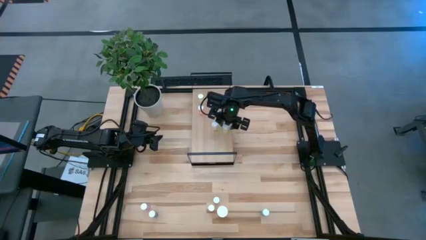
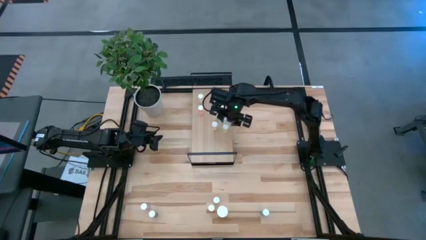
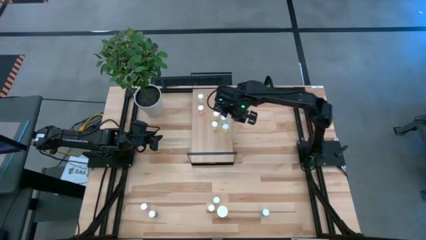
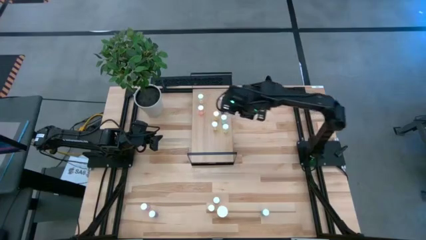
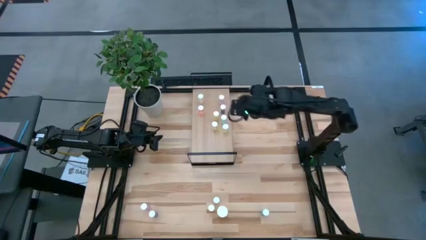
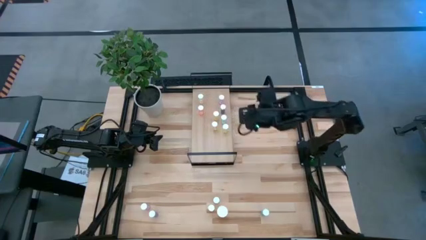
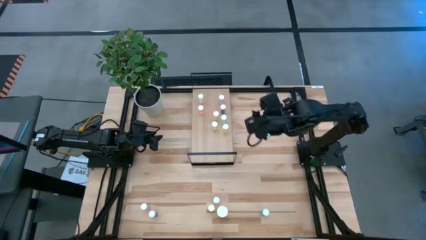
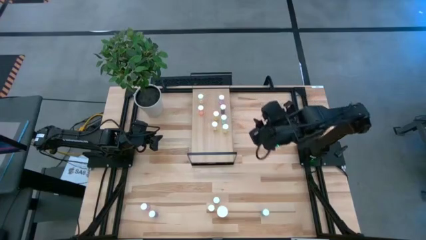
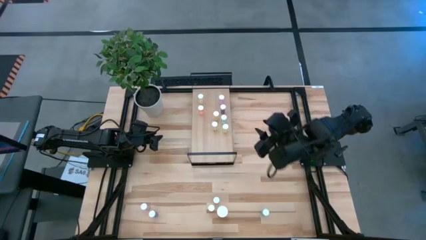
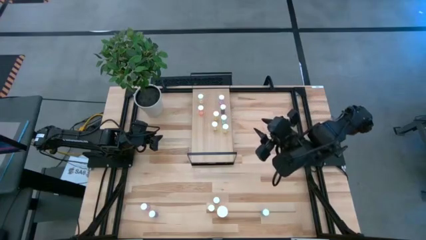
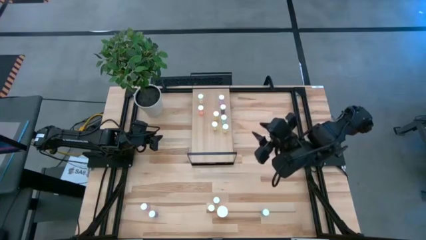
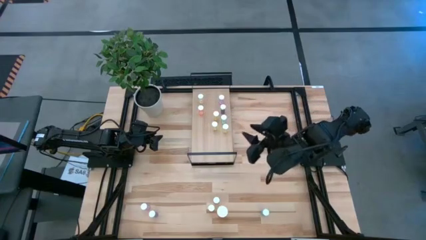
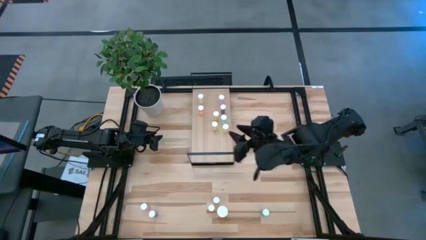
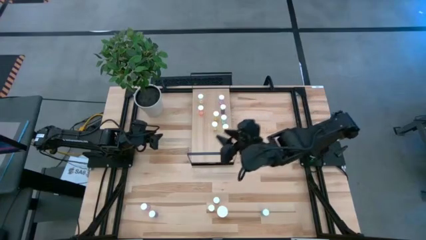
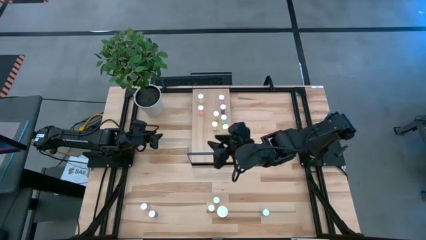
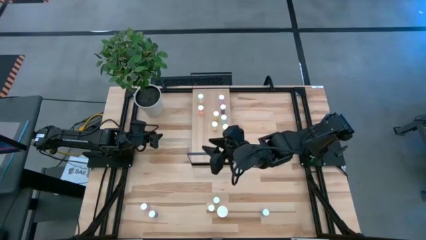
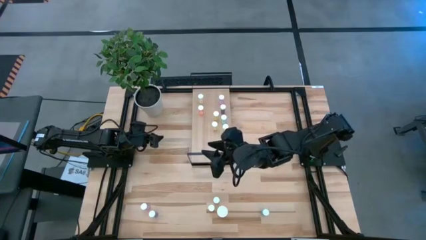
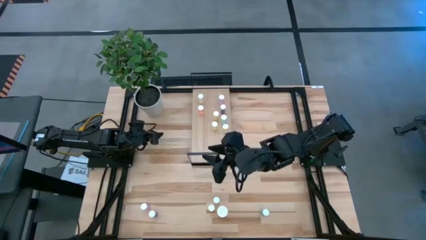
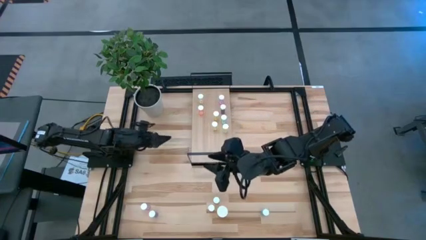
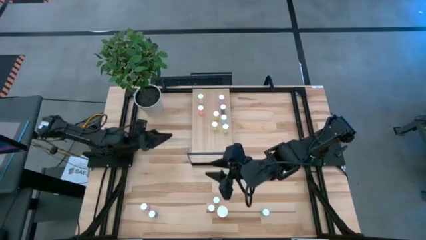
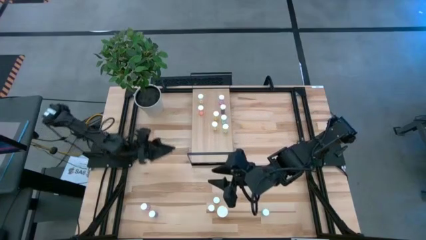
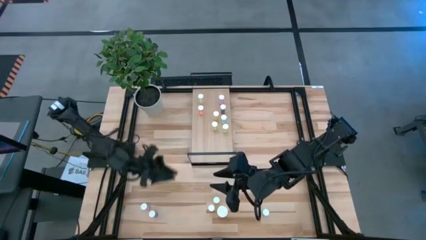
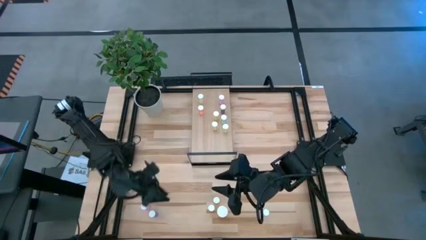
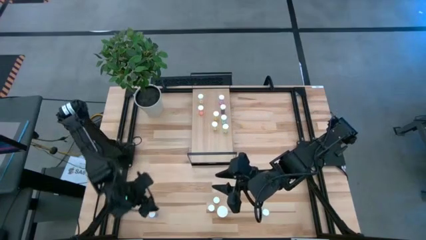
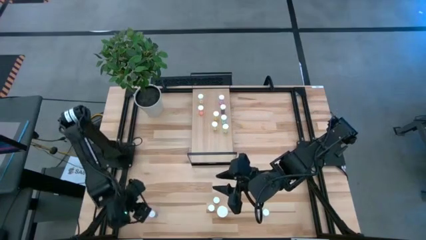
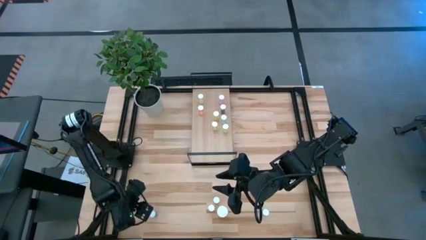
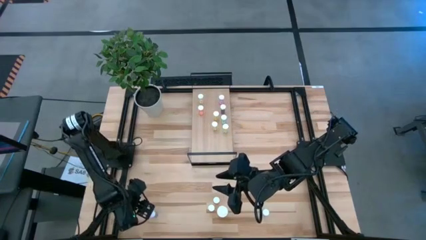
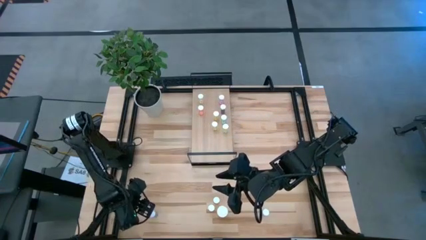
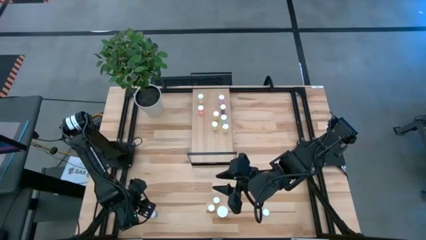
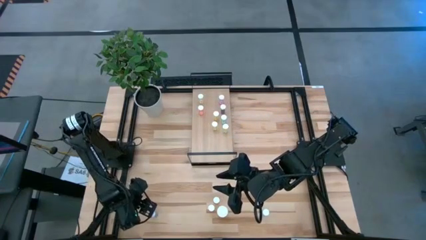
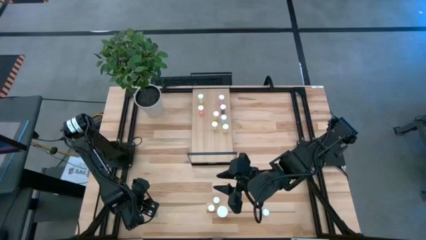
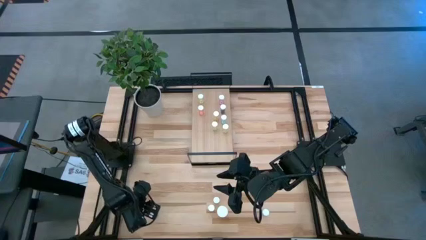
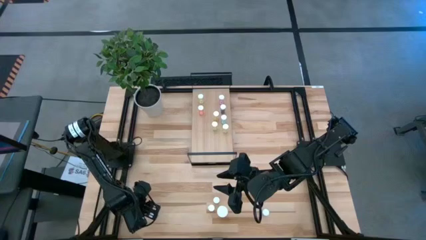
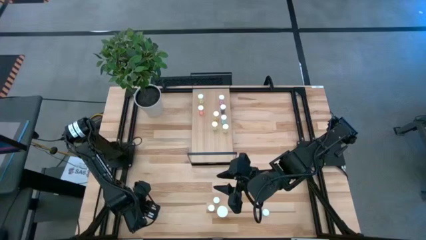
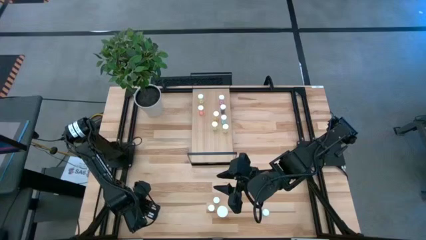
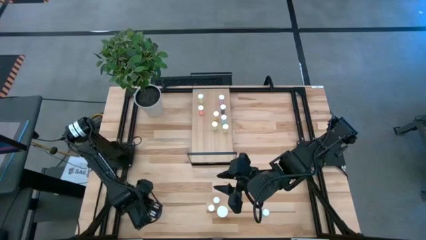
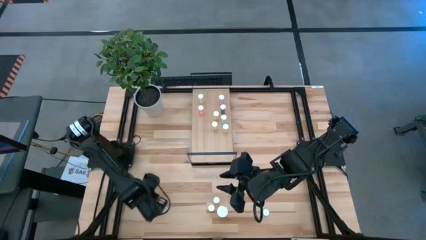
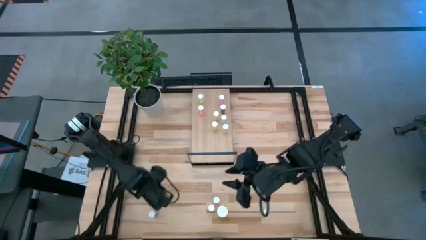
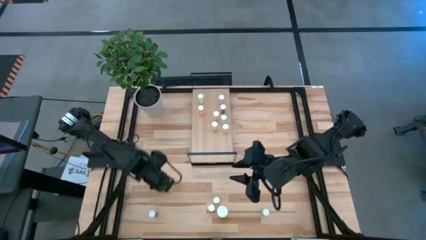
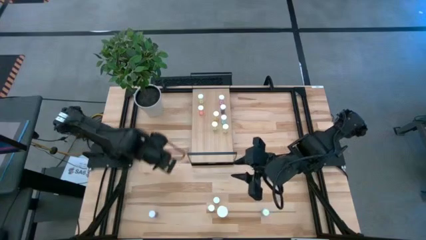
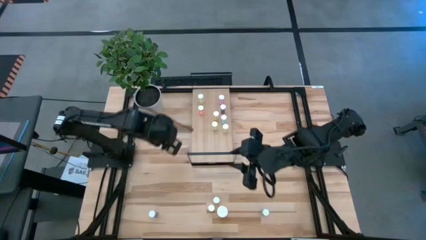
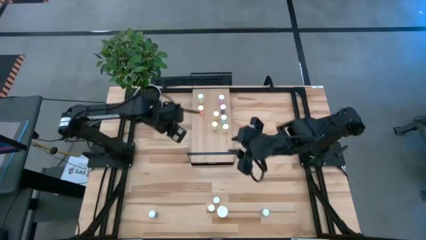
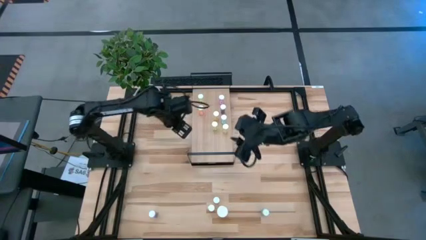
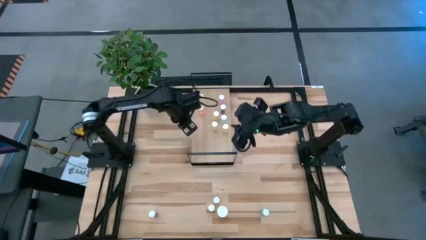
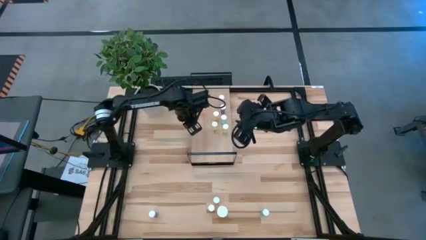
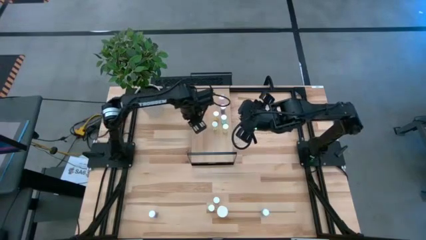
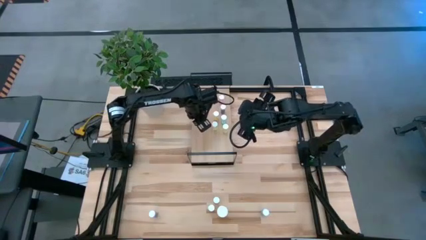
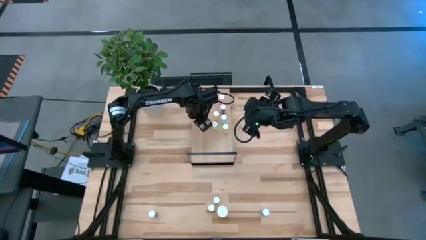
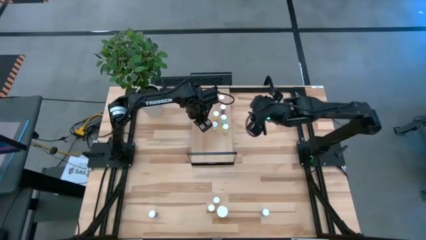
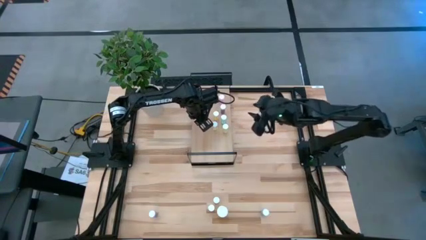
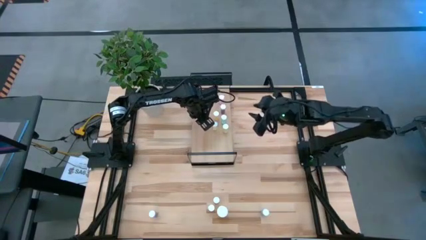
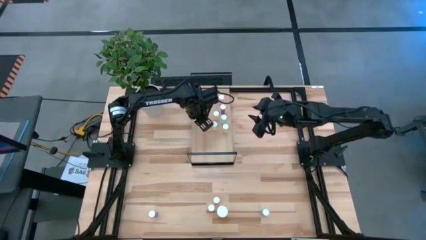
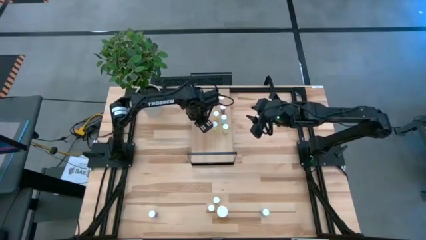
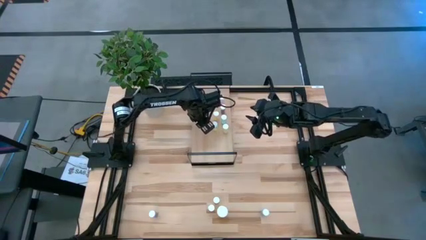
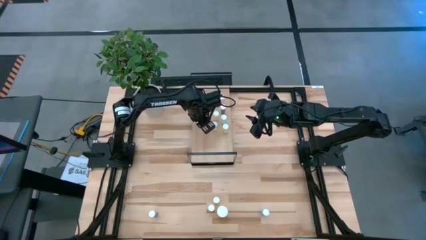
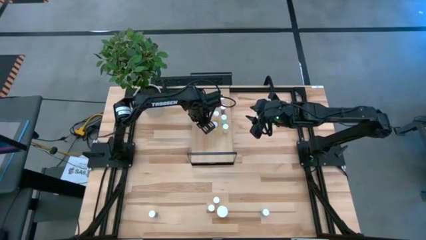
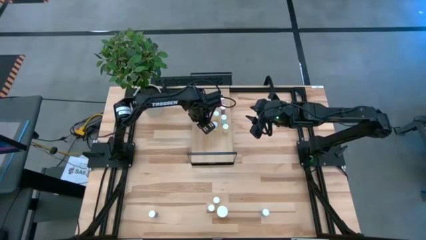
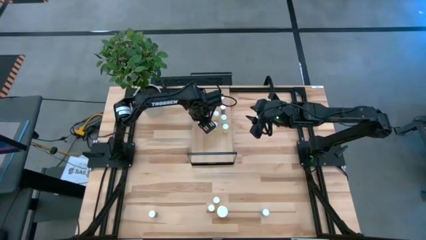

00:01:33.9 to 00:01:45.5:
Task: Pick and place medicine bottles onto shelf by color
Put the pink pill bottle on the shelf

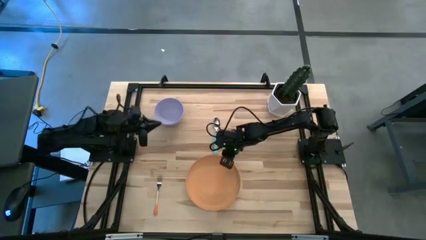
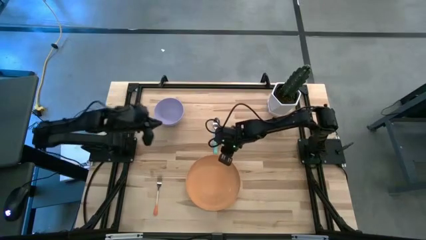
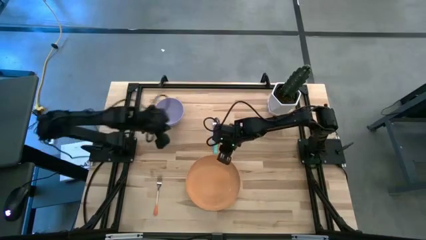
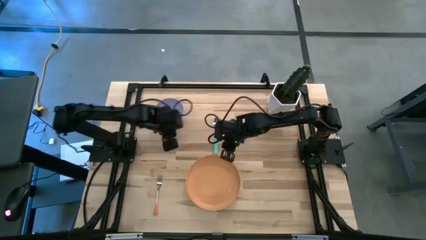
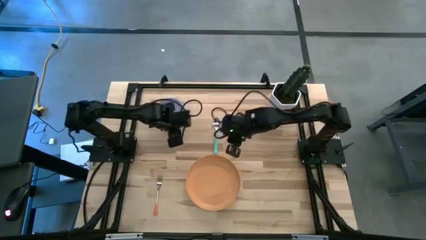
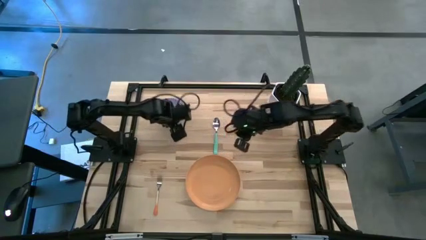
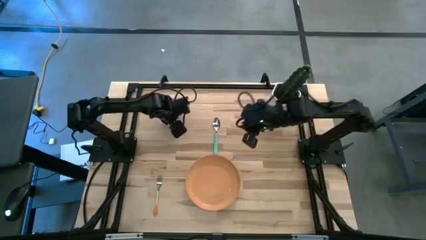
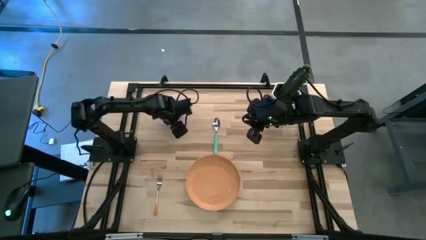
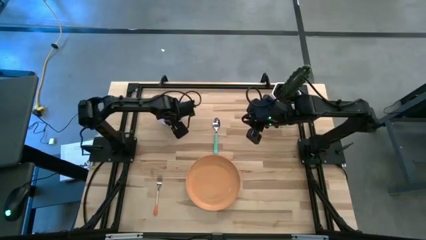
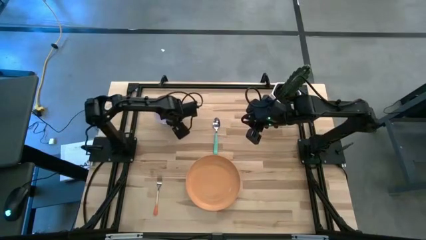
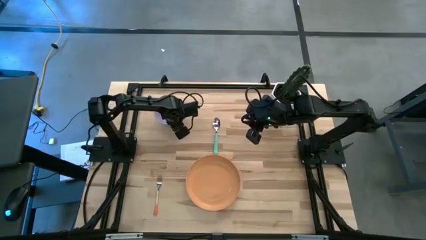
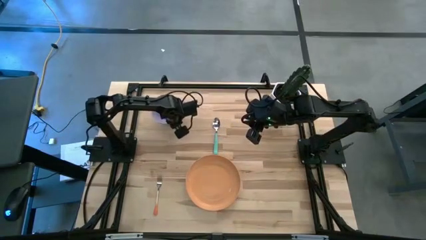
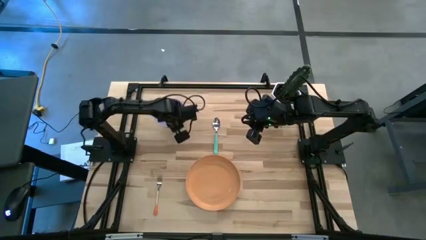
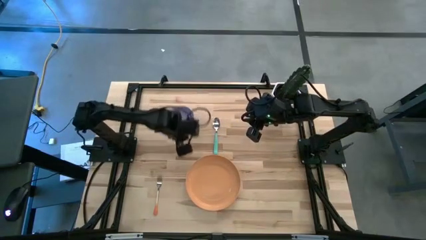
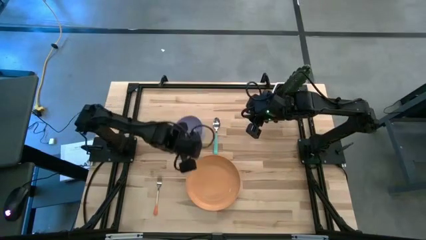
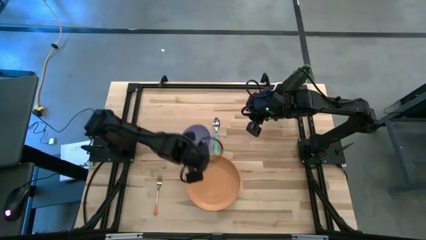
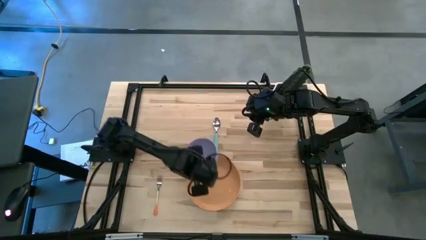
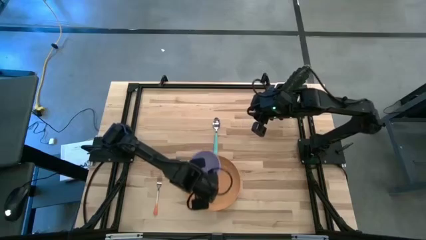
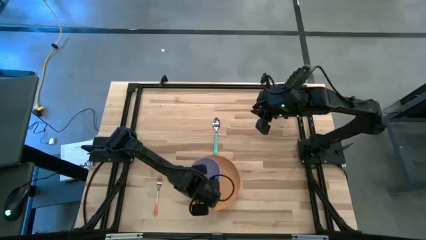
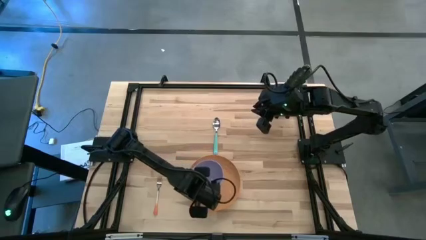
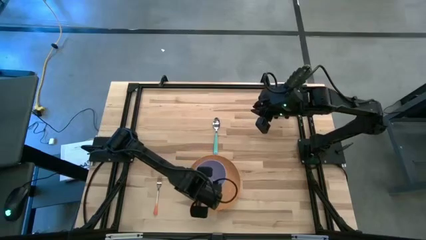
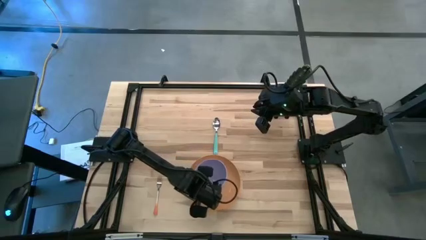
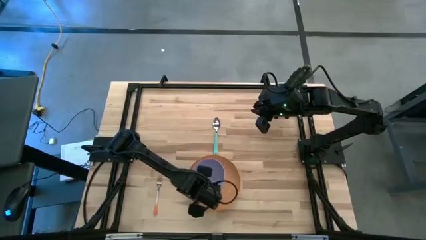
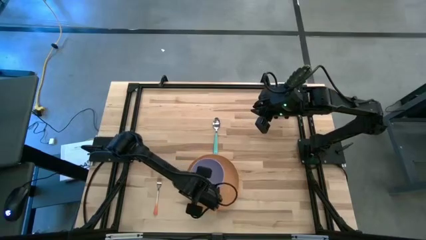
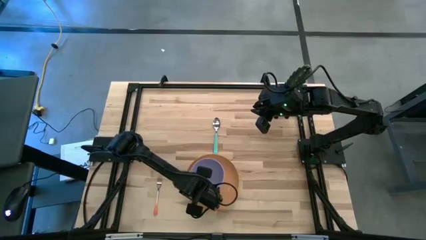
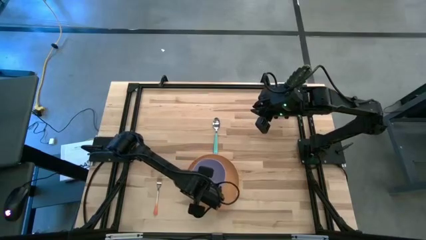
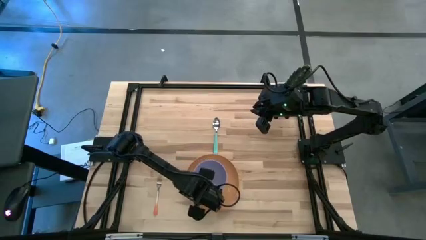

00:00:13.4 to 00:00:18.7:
Task: Set table place
Put the purple bowl on the orange plate
